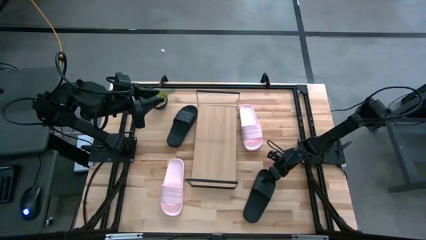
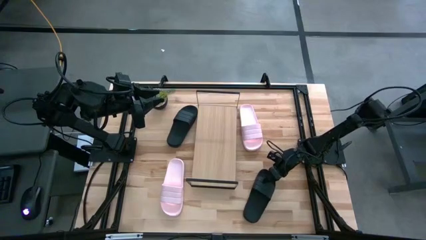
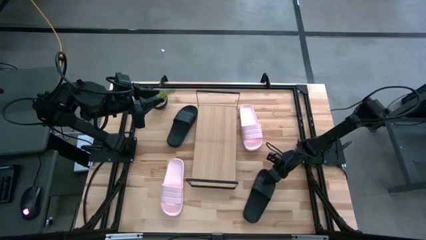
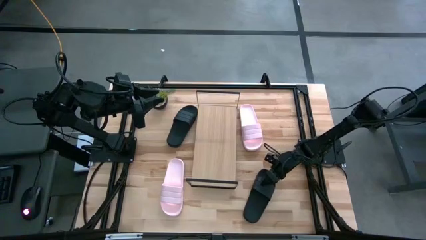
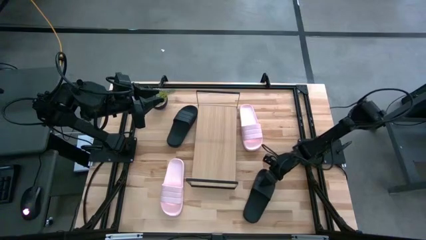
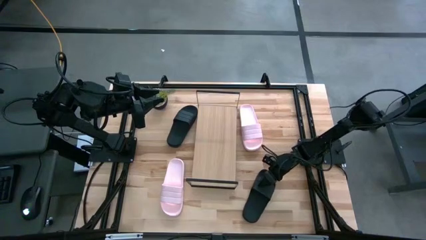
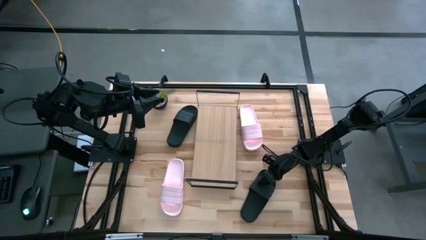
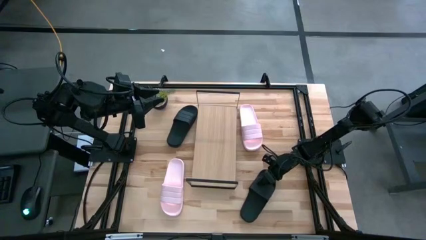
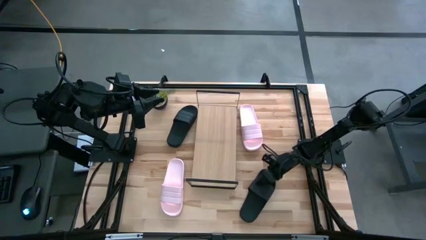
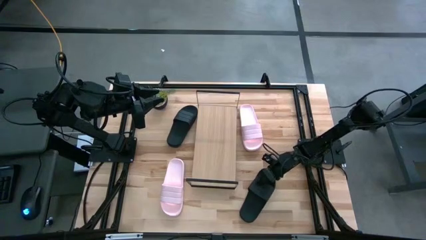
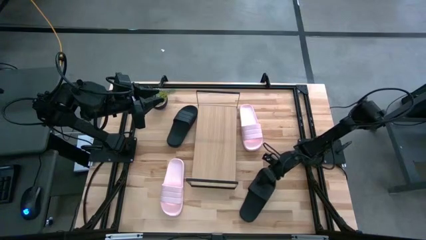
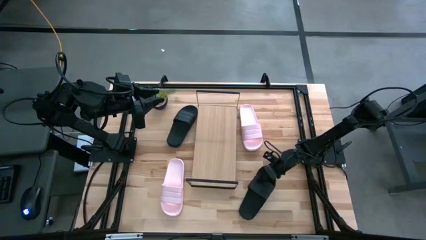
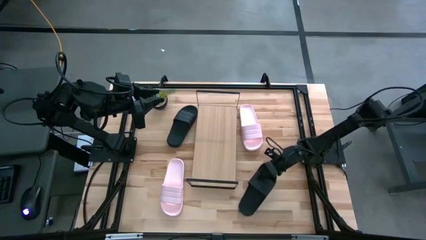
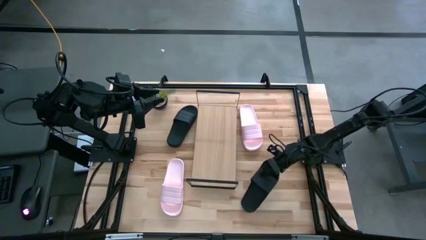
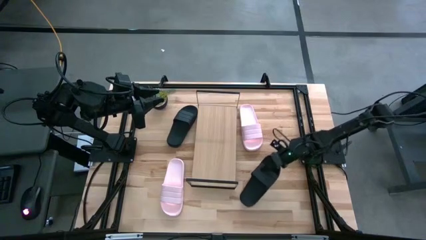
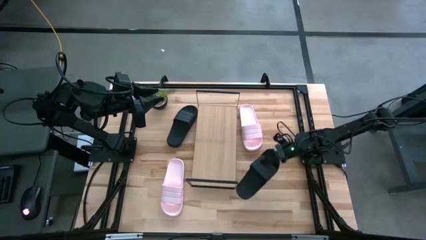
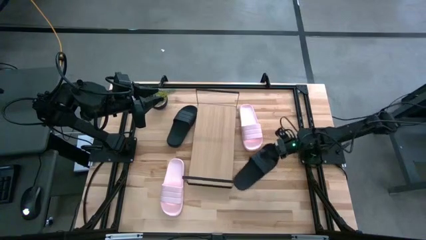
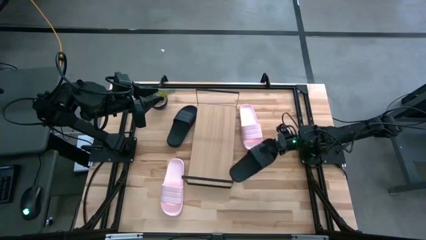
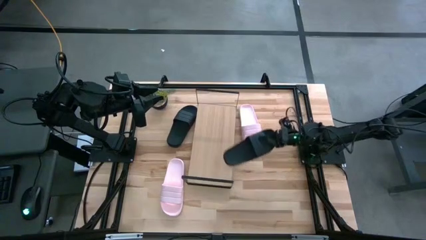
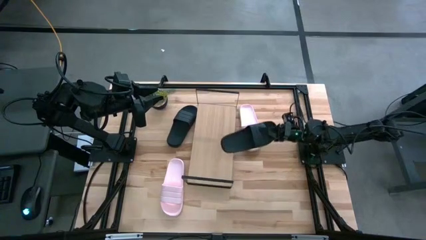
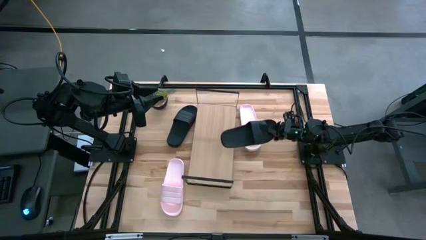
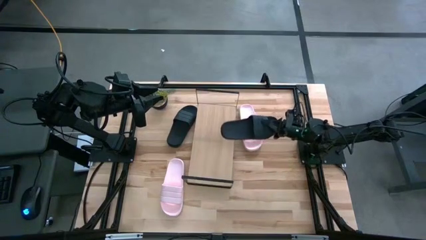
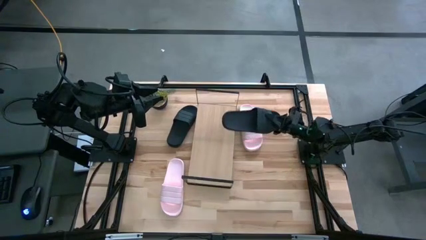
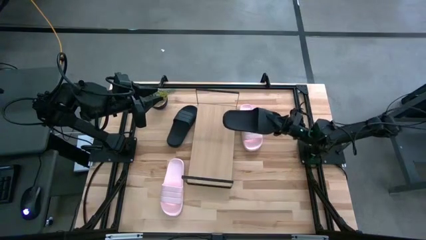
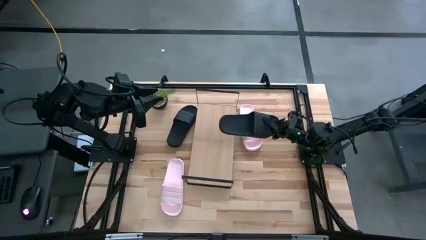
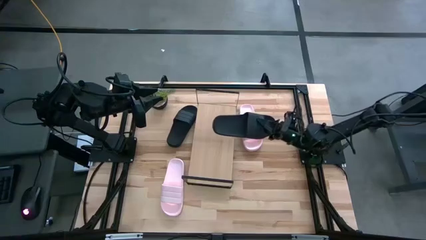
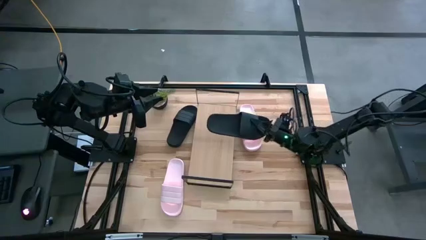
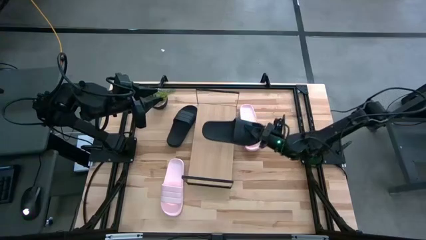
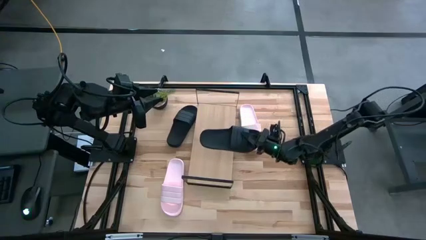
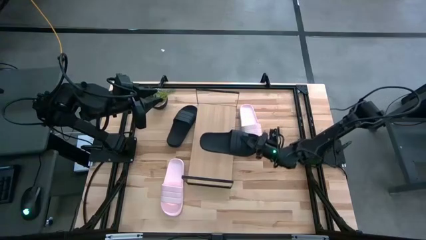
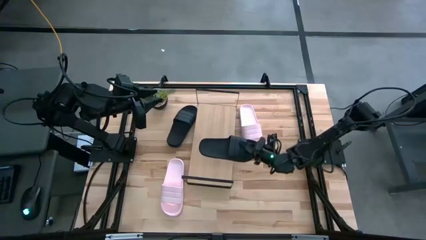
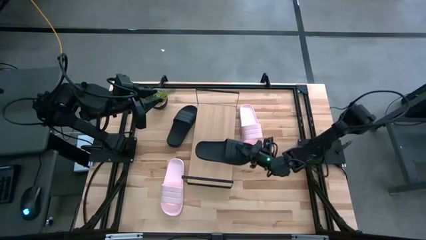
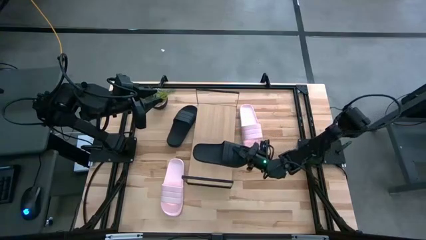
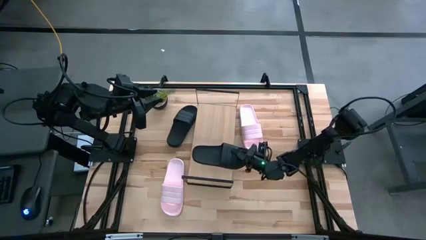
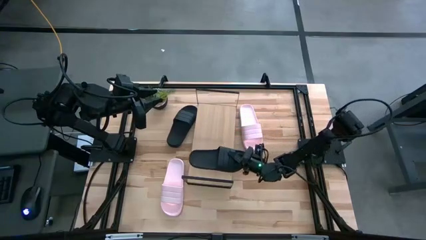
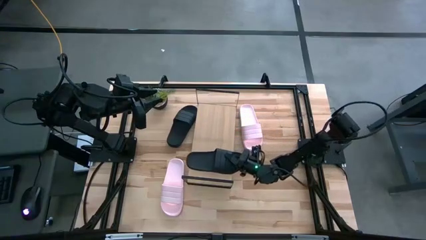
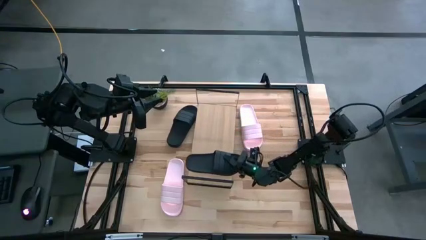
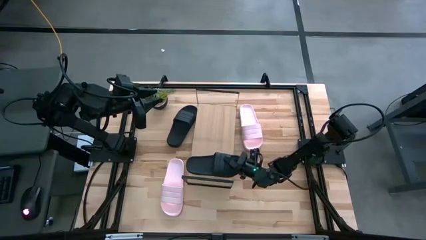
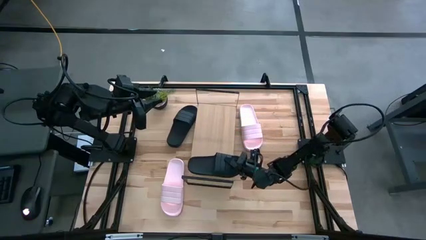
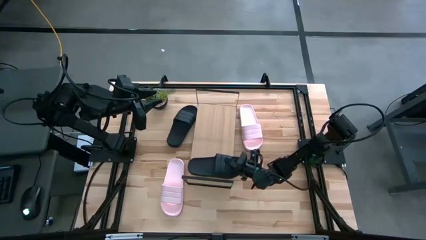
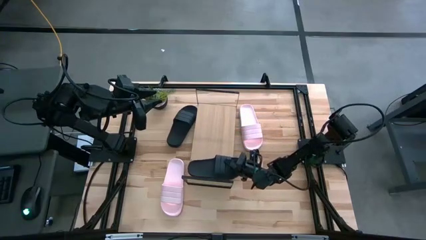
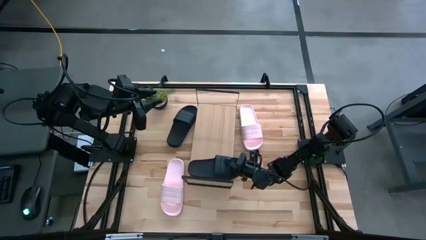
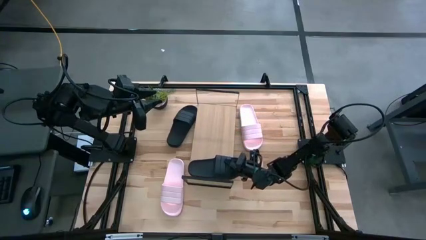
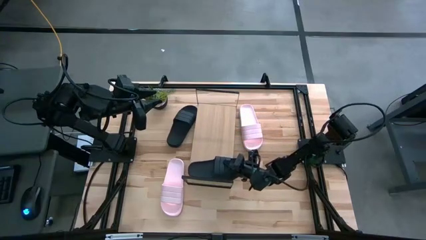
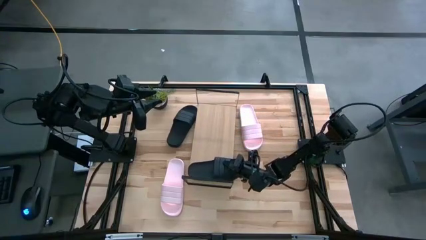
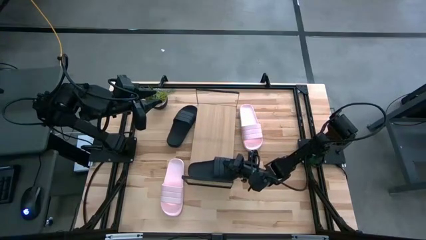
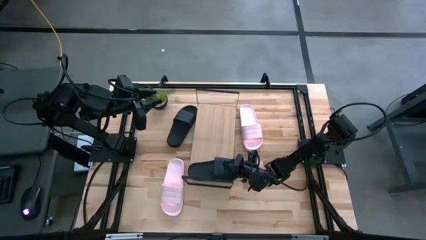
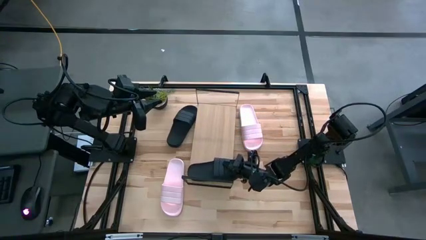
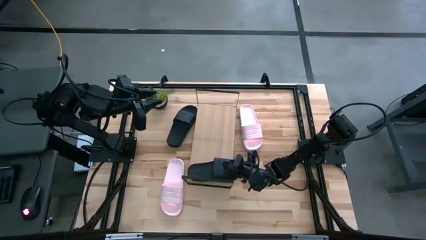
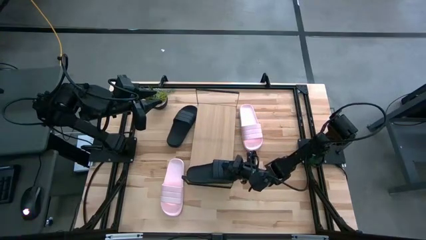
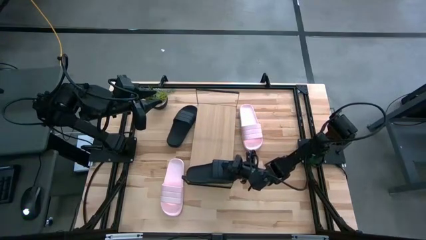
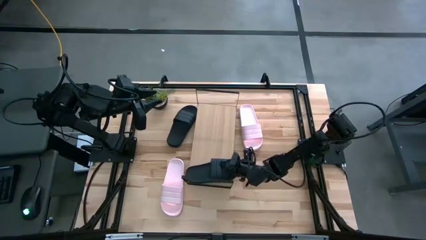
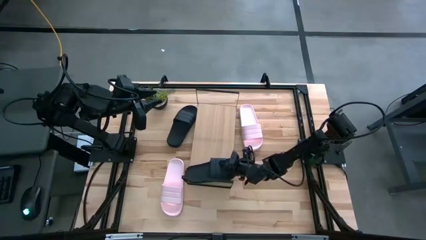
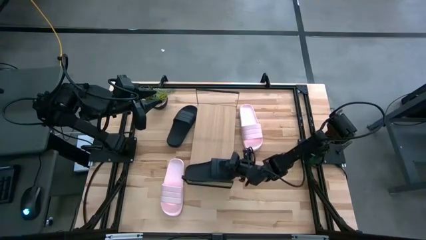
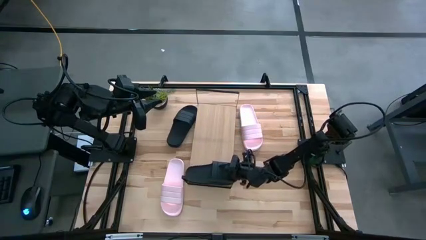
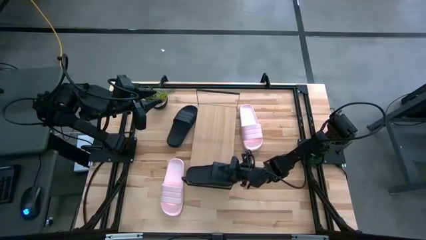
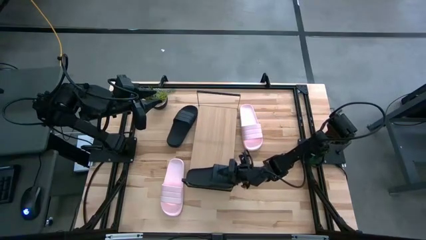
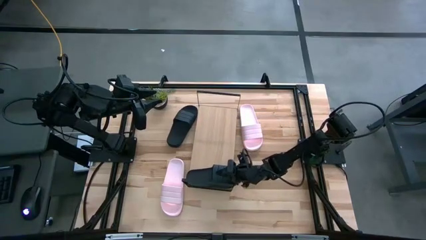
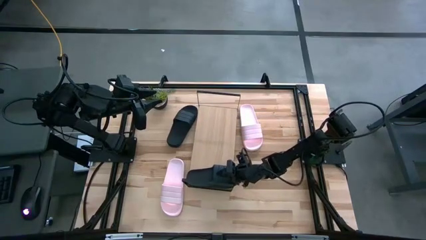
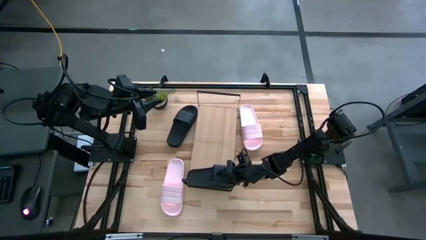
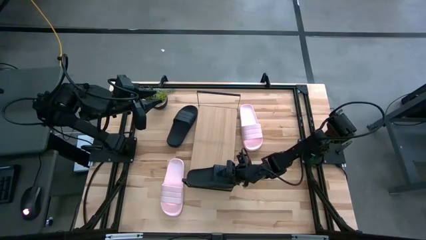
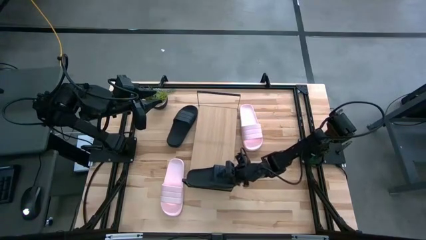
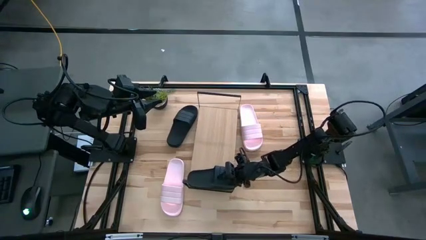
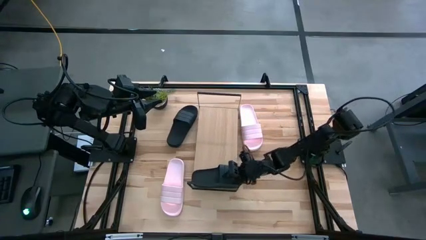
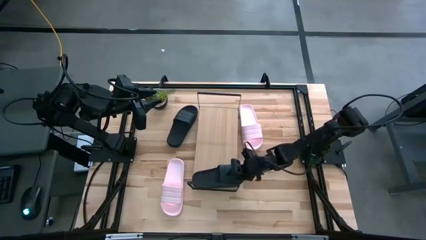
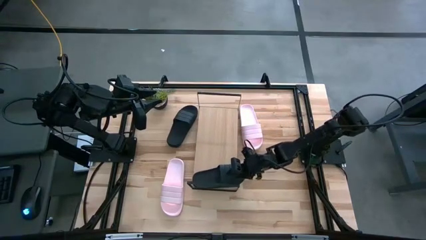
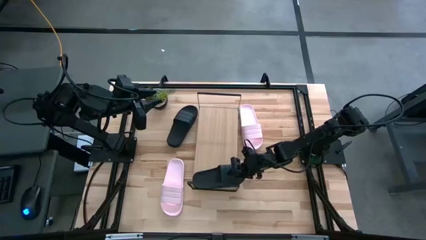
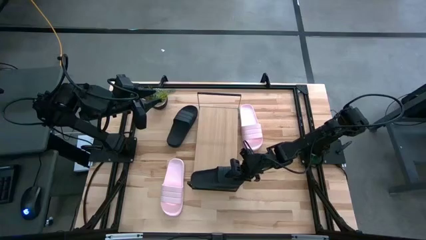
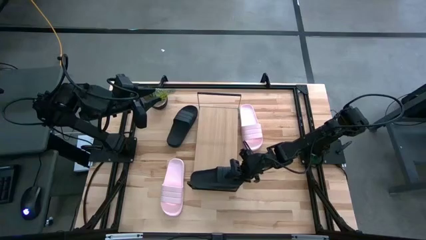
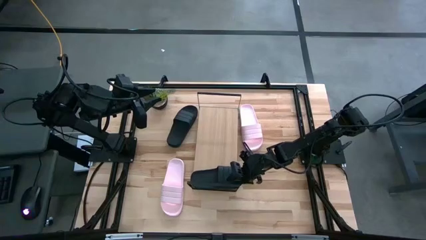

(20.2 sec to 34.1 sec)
Task: Pick and place slides into the shelf
Put the bottom black slide on the shelf
